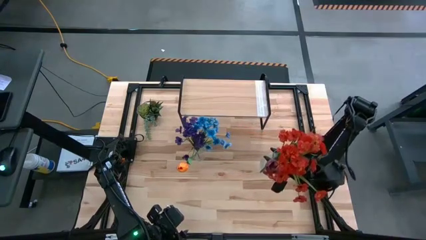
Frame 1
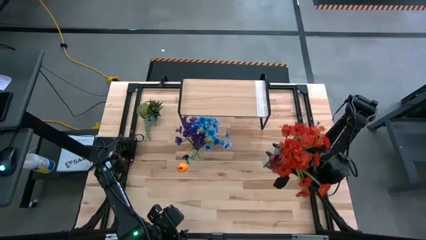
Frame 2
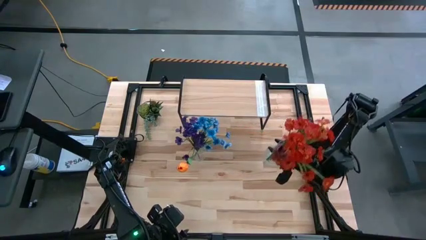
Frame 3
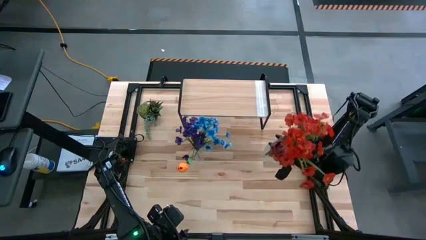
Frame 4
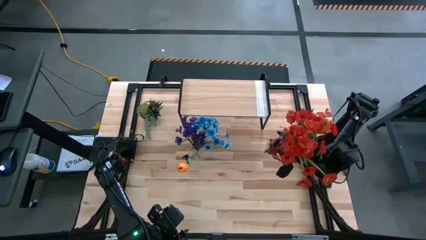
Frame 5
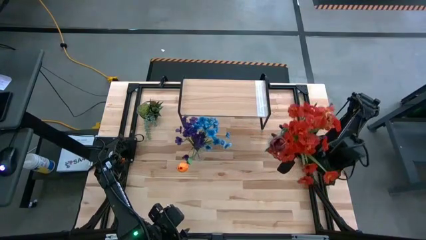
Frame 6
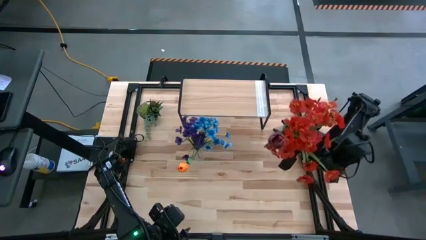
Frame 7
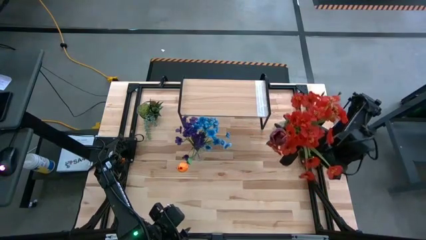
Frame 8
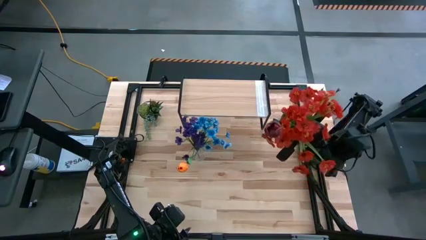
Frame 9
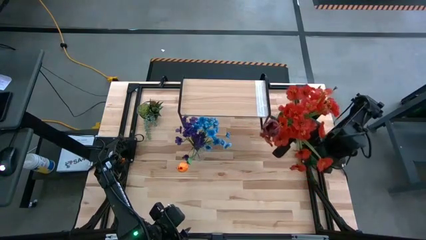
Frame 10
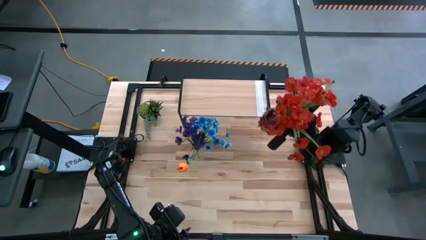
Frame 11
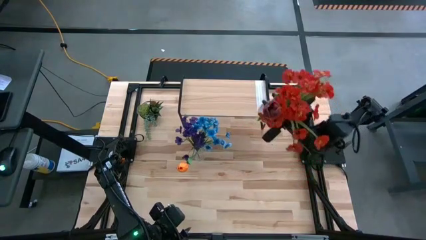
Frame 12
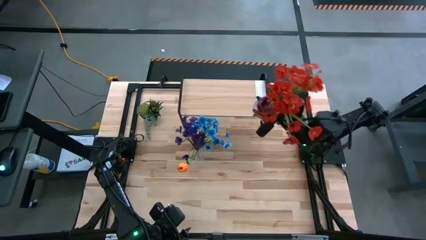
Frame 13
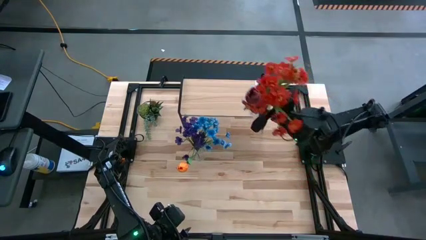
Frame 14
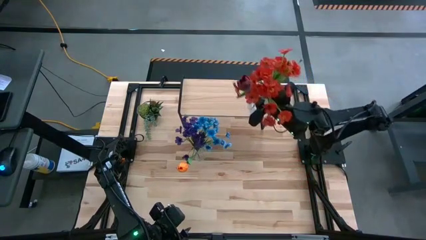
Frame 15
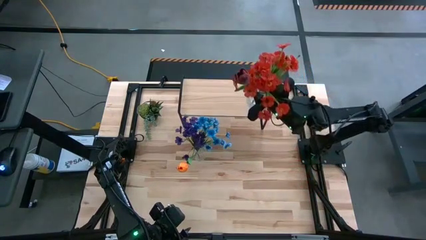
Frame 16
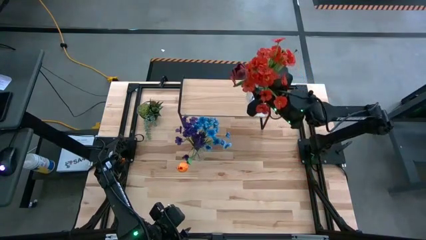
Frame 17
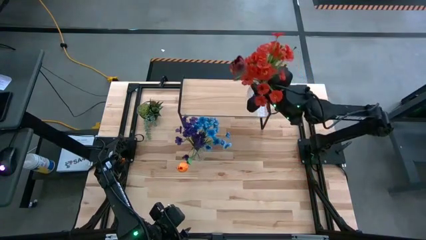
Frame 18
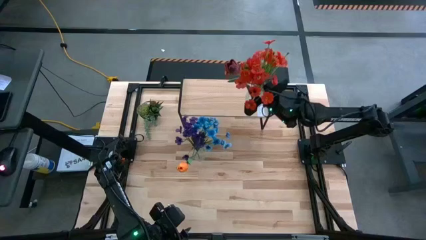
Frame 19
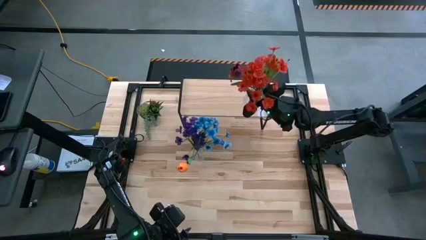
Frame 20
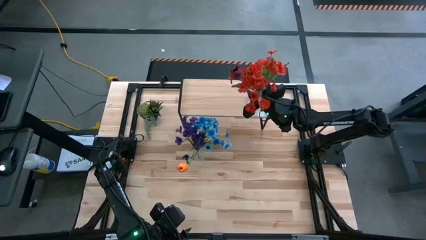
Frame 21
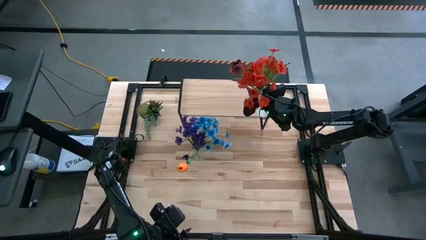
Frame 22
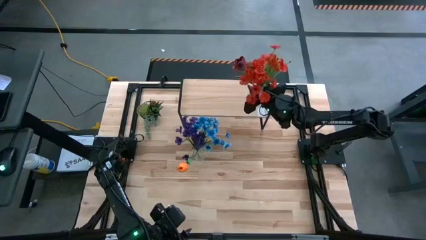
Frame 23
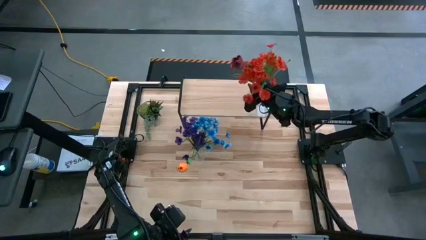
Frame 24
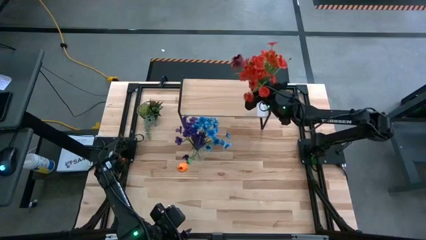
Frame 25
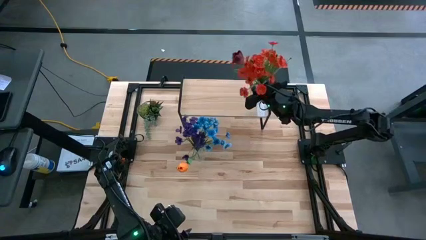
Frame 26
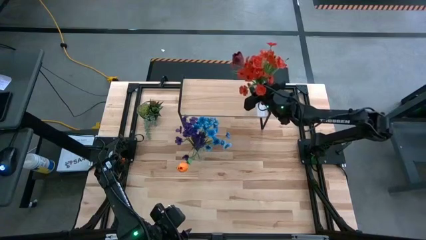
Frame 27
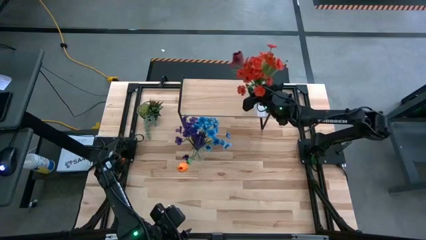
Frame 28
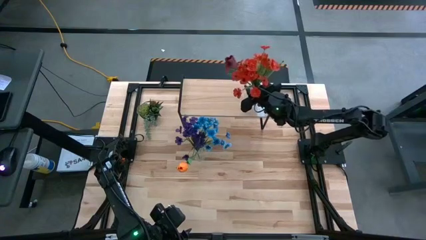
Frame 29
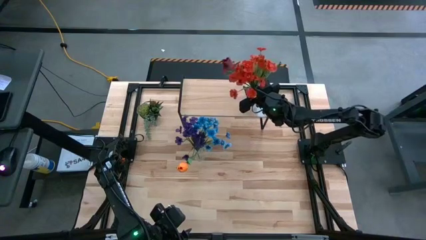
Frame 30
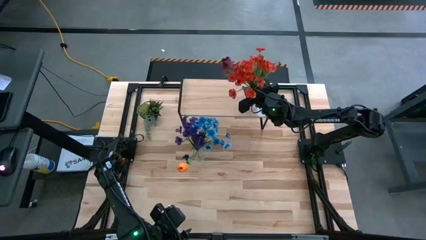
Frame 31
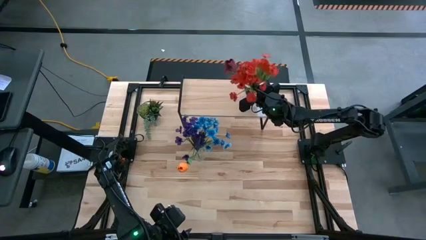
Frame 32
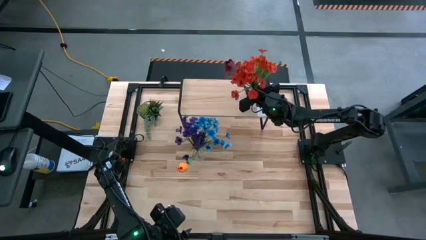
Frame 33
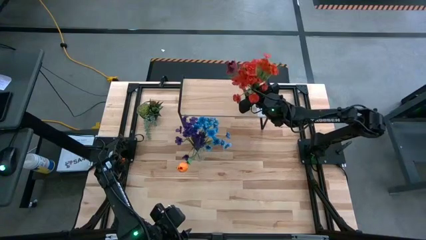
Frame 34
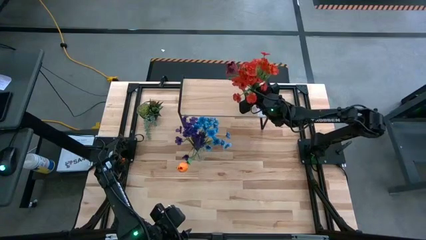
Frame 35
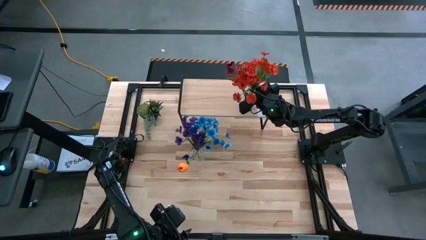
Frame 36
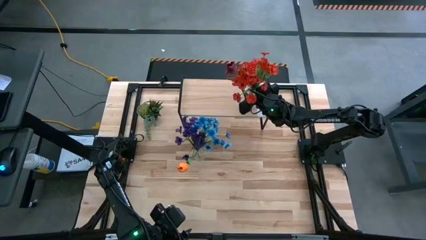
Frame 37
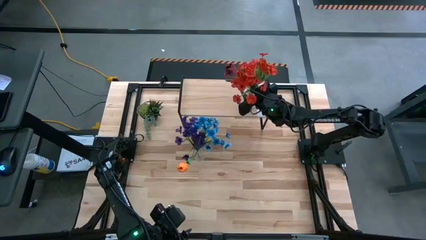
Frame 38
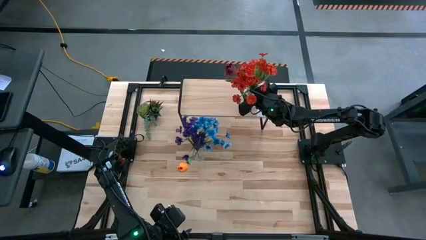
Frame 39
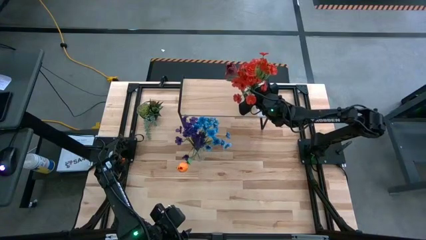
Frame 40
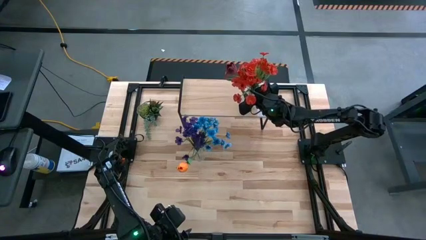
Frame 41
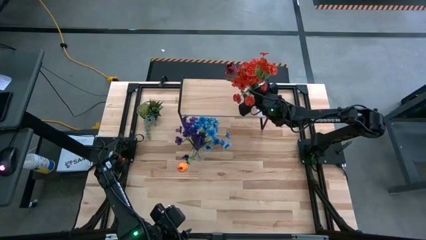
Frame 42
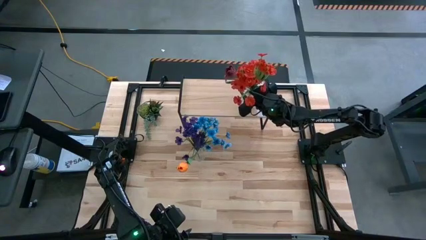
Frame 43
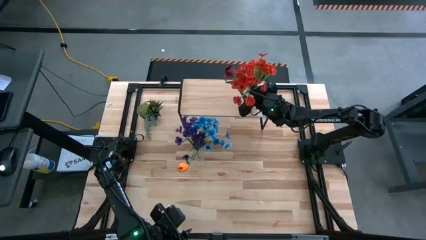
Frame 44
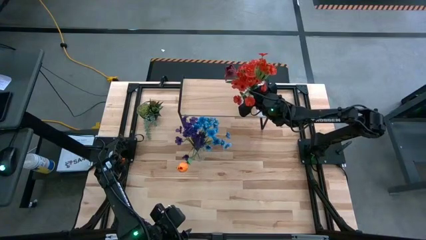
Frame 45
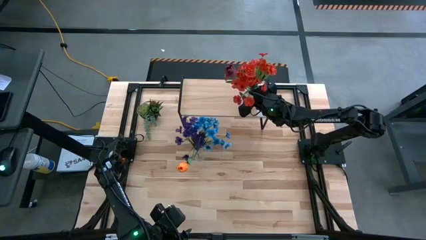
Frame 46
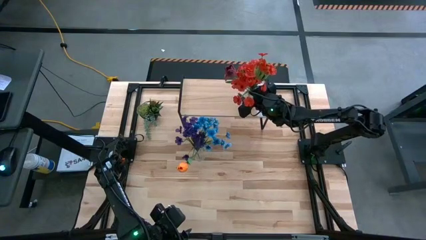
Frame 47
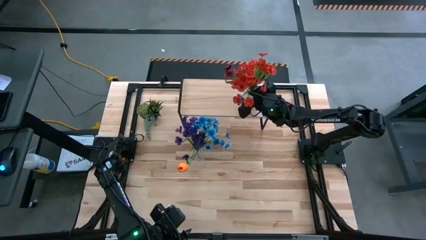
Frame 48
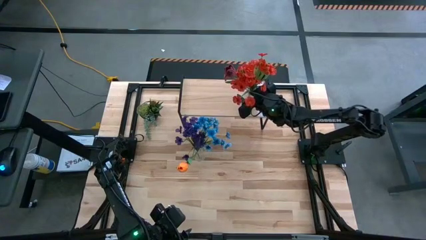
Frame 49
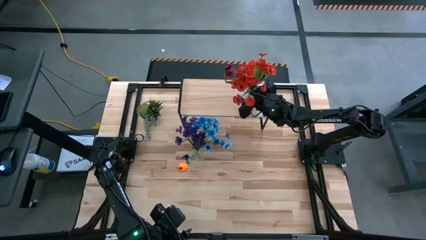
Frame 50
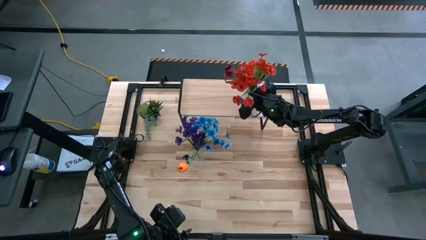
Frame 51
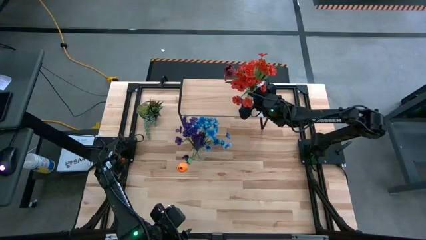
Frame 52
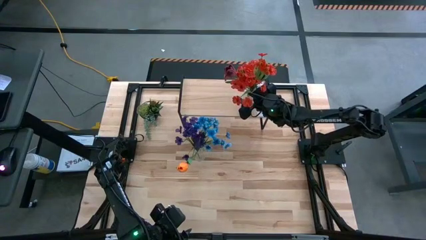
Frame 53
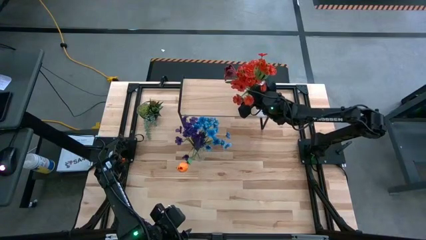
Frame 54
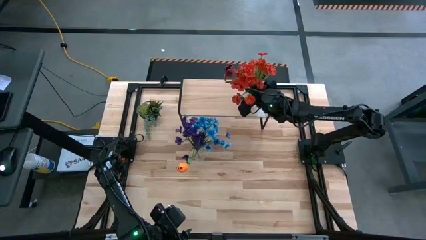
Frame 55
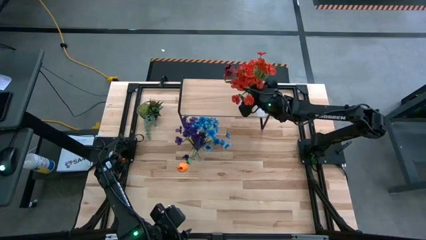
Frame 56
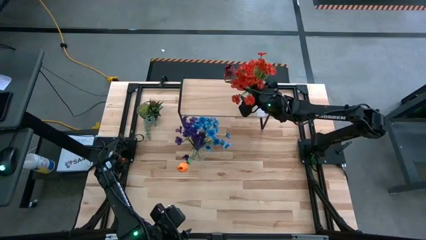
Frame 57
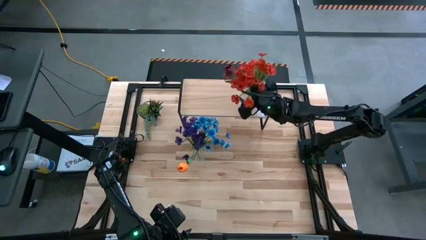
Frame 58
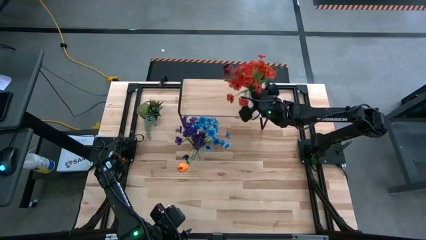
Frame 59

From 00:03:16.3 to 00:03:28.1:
Task: Pick and place flowers into a vace then onto a shelf
Put the right transparent crystal vase with flowers on the shelf

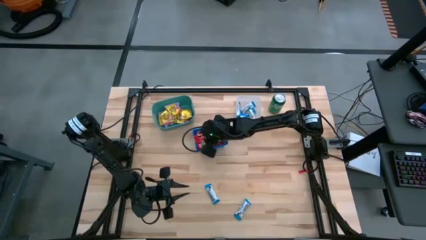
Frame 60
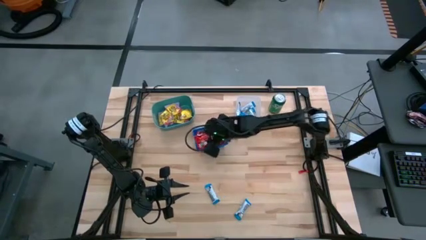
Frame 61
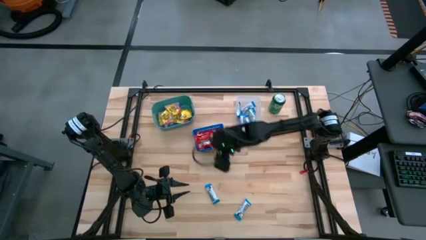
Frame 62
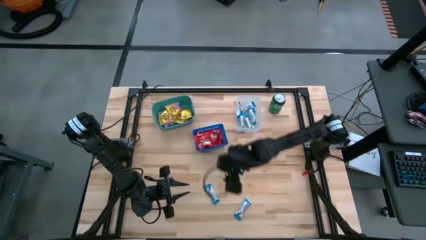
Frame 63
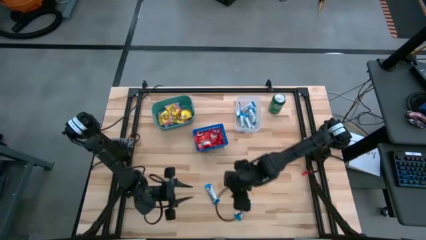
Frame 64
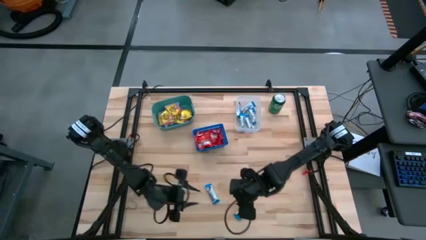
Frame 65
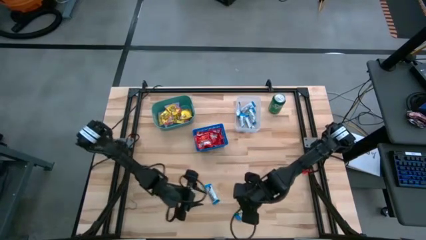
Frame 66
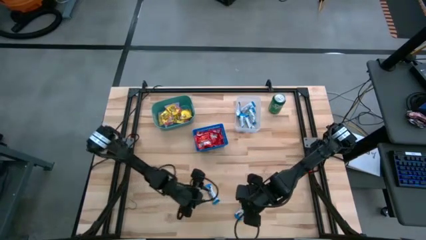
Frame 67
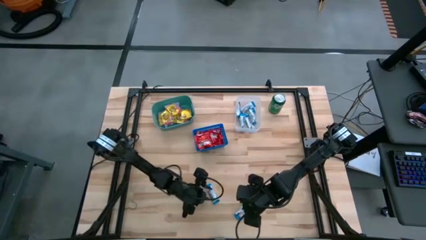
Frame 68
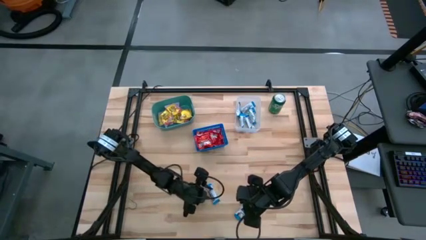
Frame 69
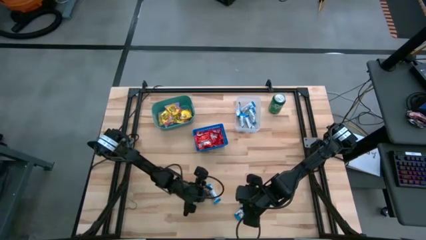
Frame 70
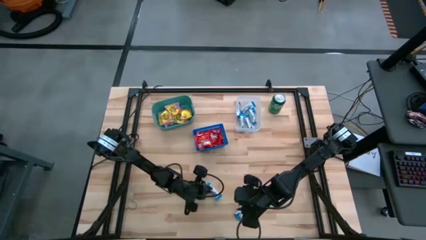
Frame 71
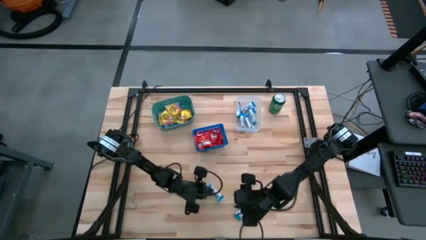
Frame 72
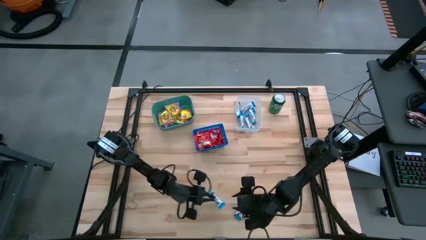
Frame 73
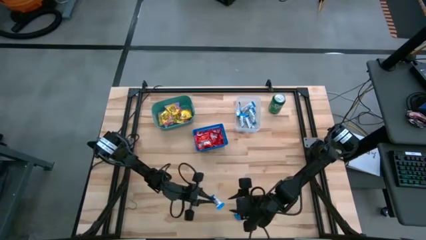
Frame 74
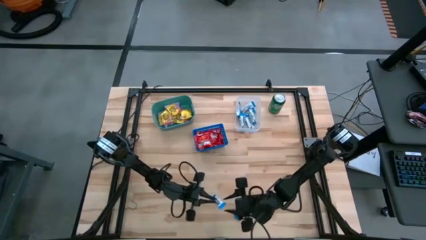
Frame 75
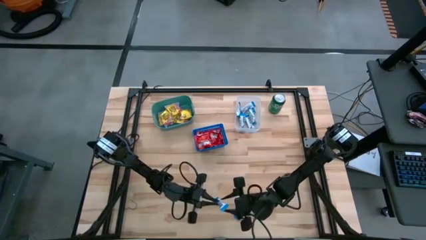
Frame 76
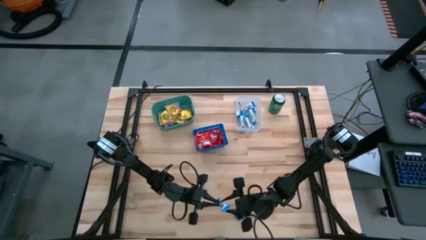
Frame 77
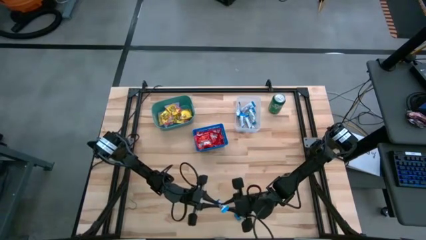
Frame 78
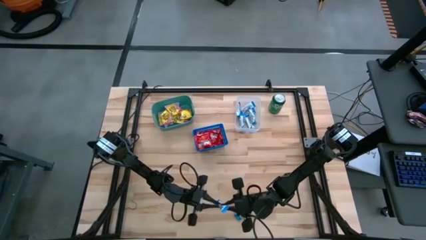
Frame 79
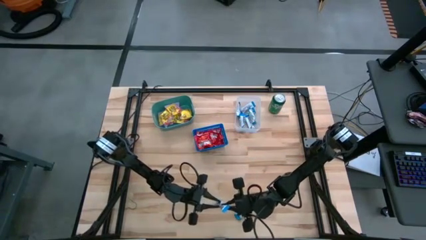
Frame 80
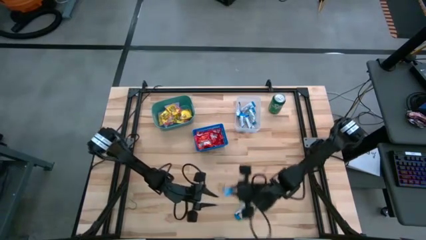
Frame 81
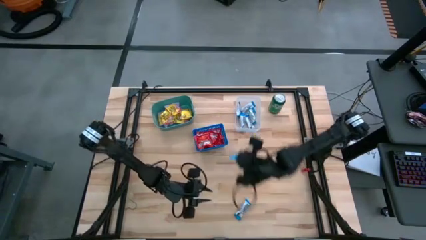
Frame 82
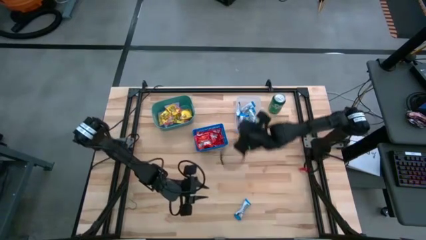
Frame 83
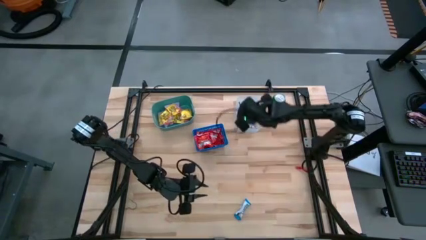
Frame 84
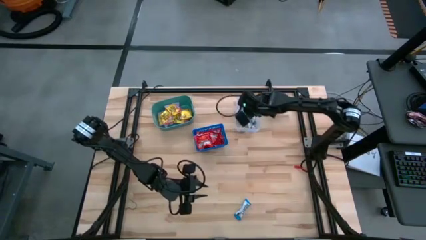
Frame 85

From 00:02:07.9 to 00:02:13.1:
Task: Sort candy
Put the hersheys bar into the transparent bin
